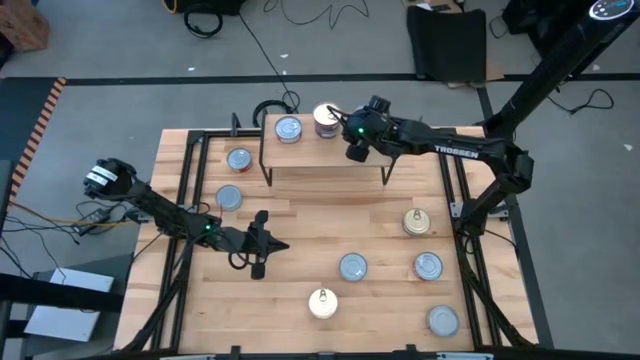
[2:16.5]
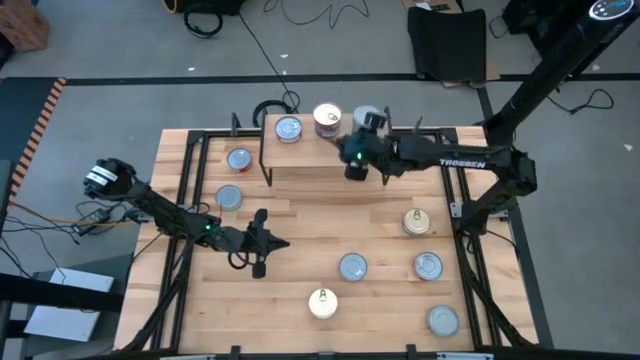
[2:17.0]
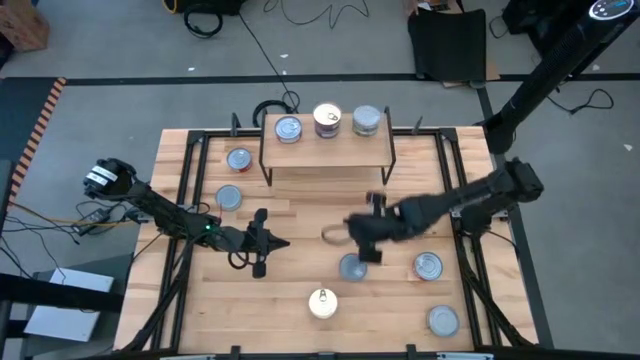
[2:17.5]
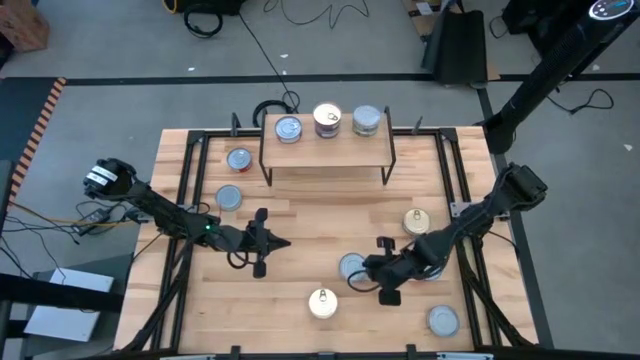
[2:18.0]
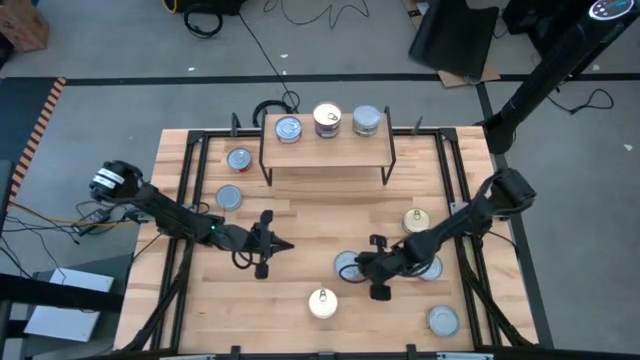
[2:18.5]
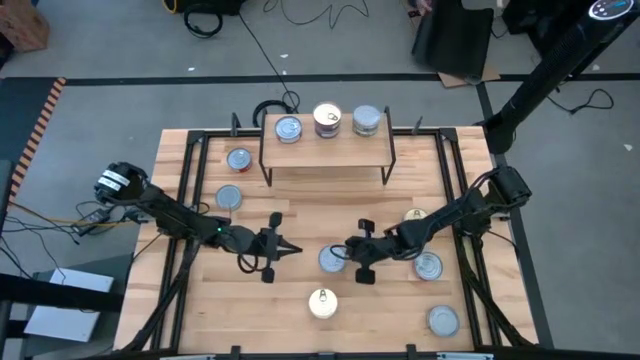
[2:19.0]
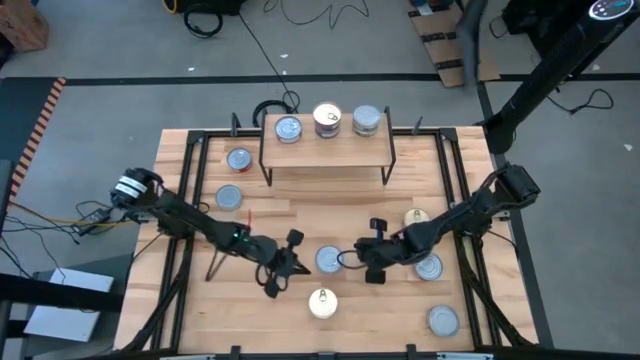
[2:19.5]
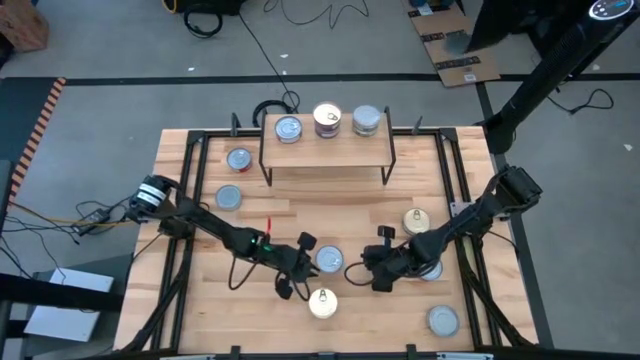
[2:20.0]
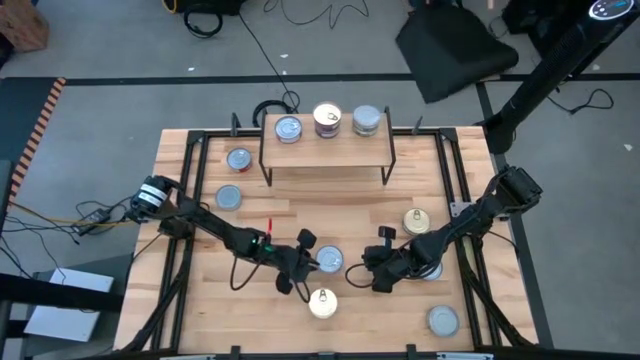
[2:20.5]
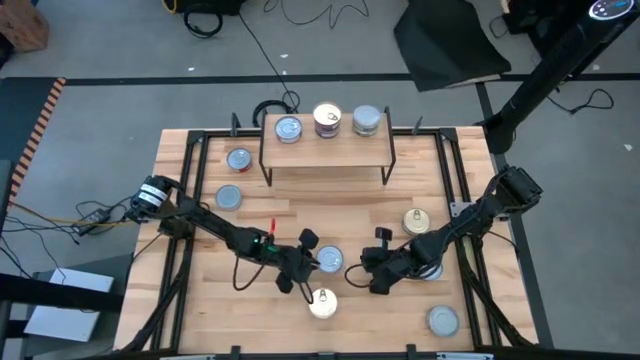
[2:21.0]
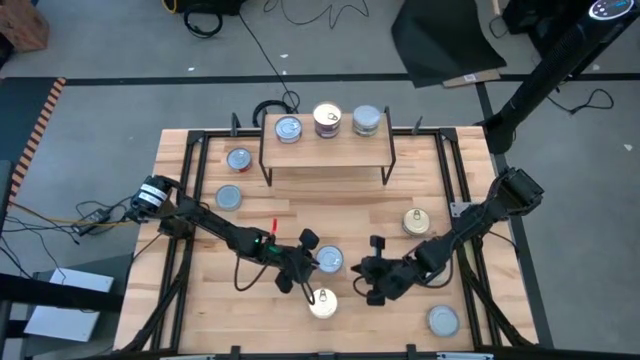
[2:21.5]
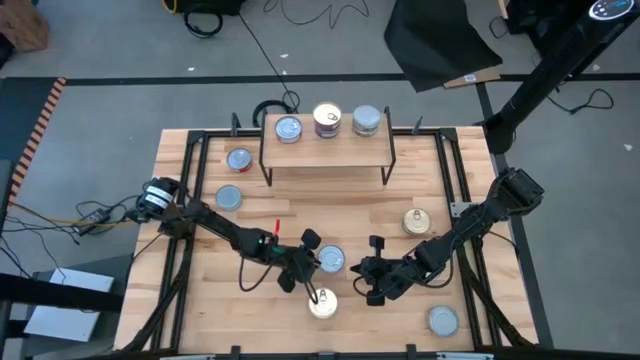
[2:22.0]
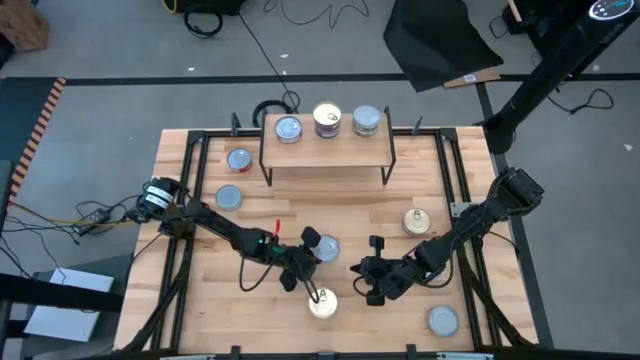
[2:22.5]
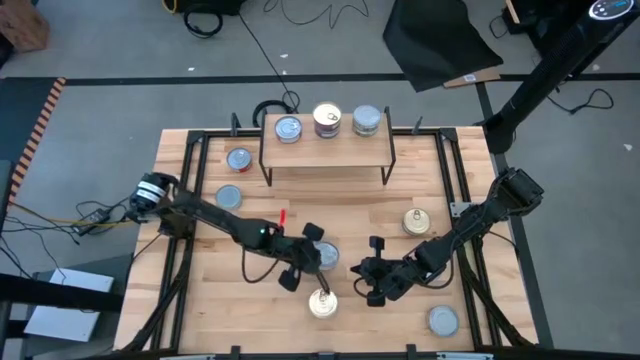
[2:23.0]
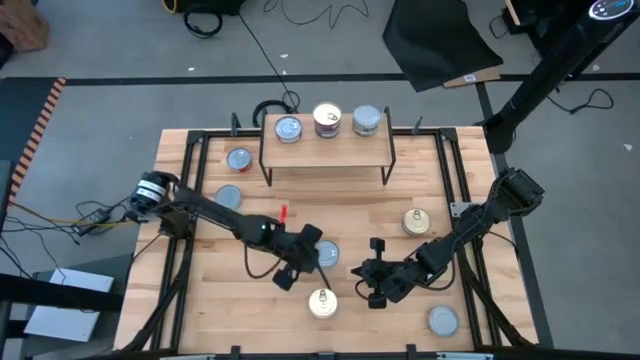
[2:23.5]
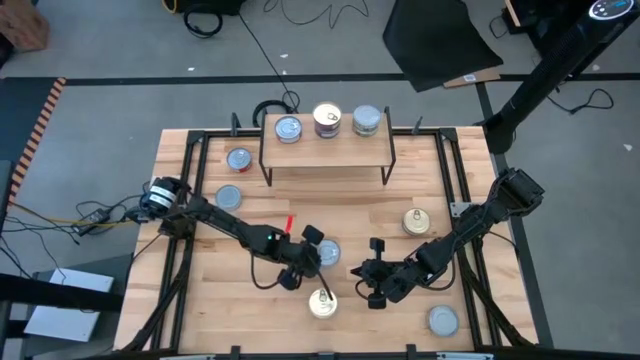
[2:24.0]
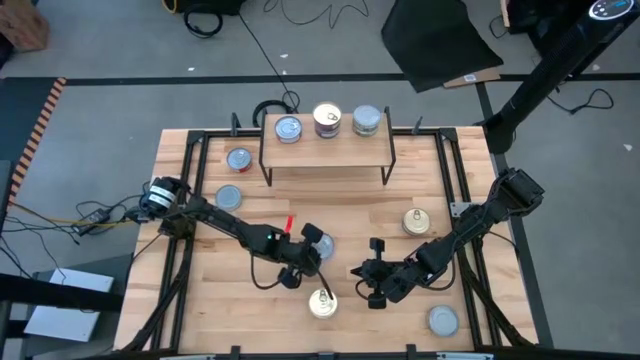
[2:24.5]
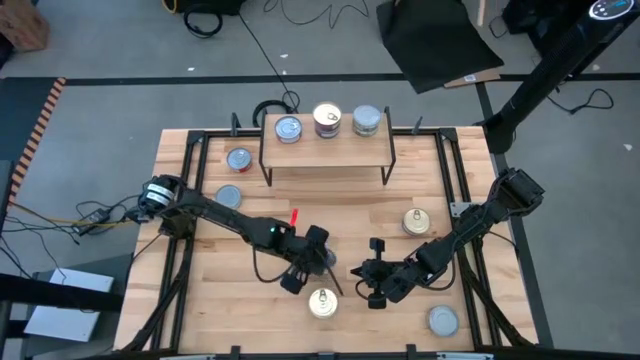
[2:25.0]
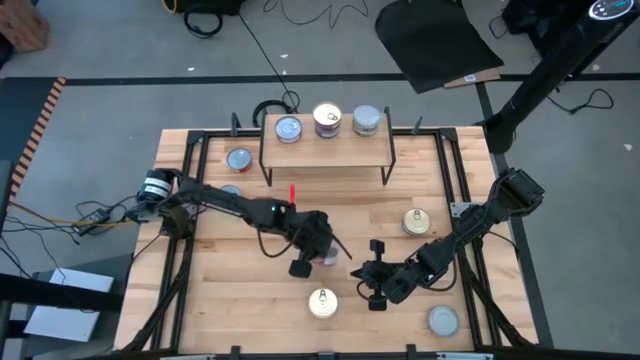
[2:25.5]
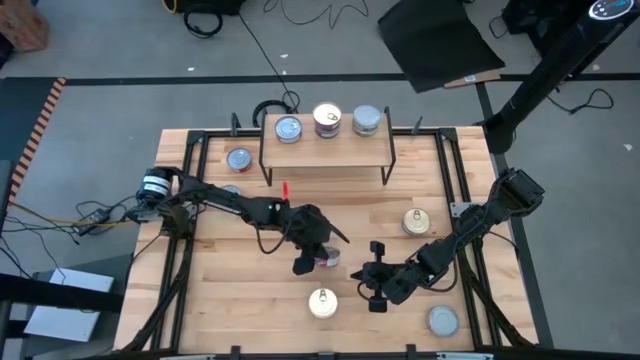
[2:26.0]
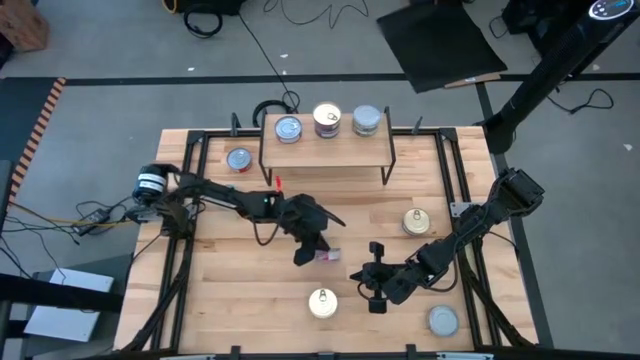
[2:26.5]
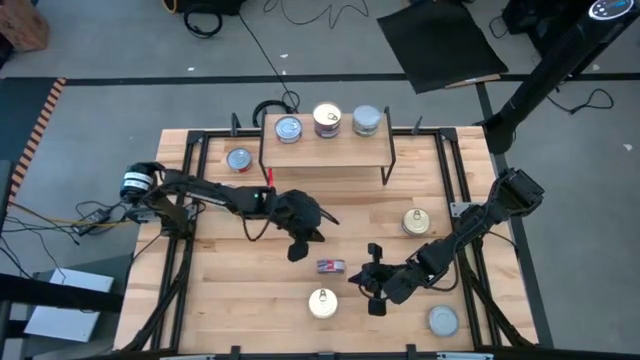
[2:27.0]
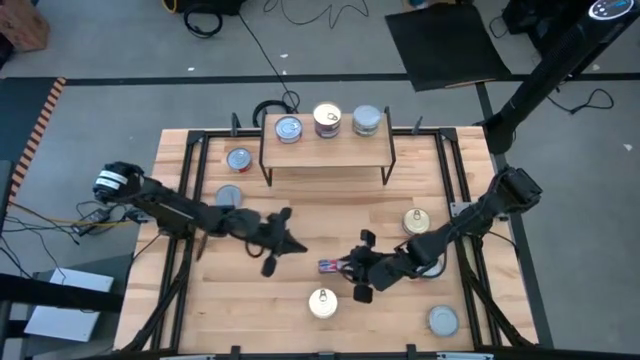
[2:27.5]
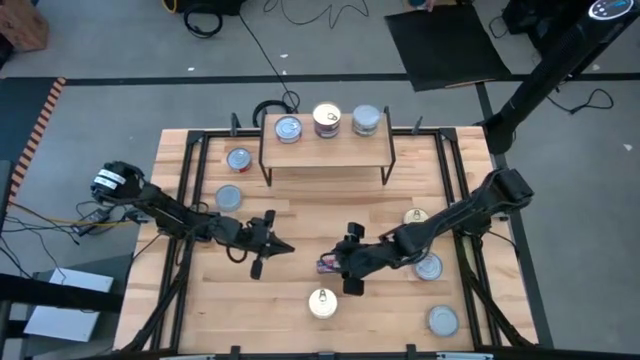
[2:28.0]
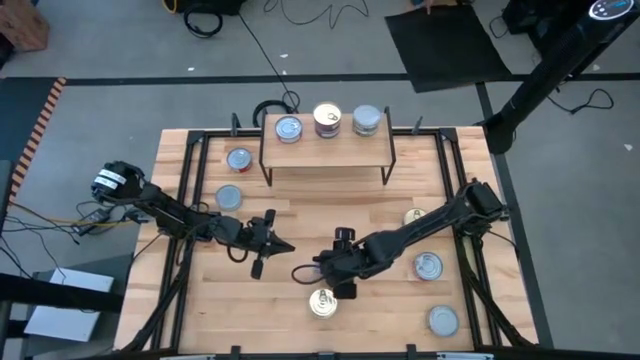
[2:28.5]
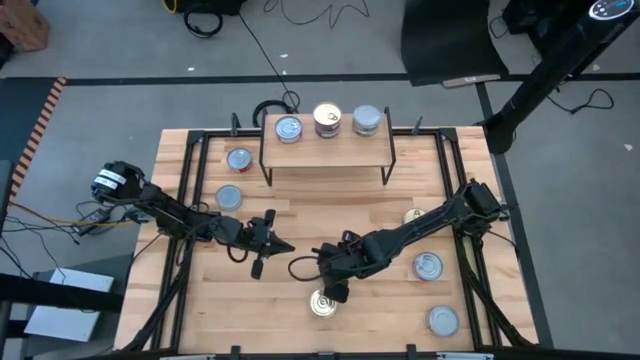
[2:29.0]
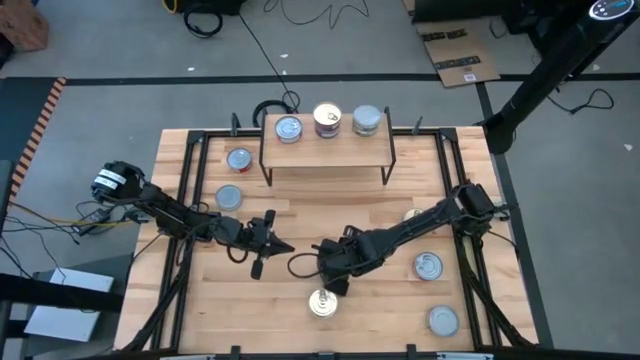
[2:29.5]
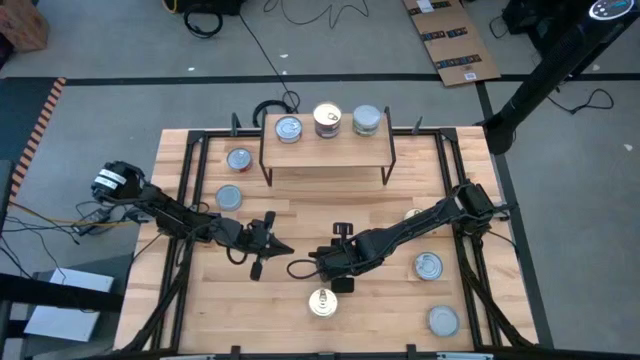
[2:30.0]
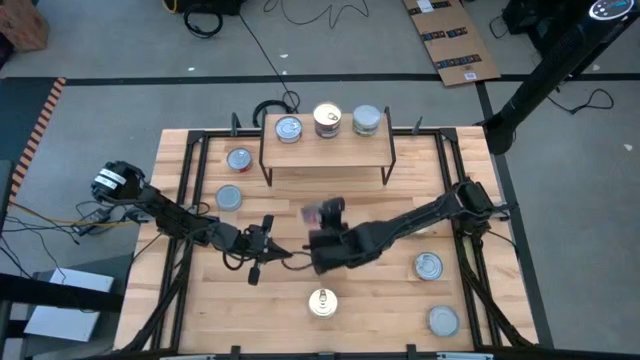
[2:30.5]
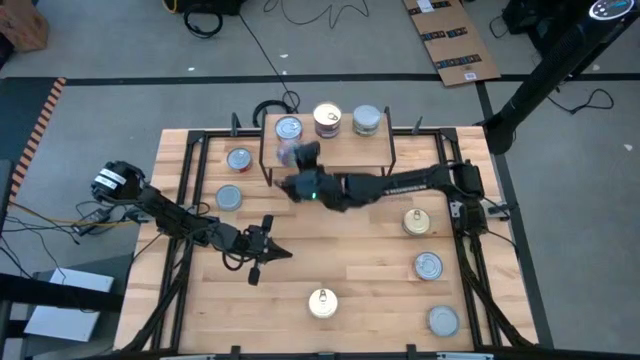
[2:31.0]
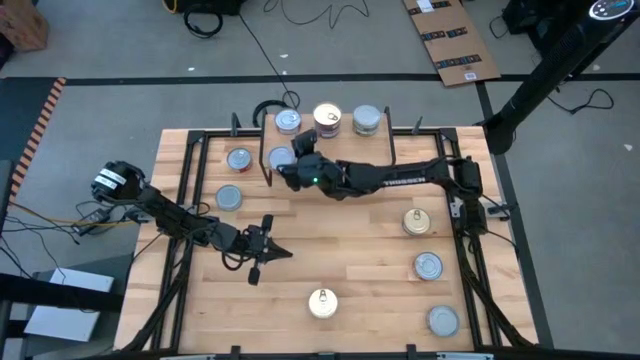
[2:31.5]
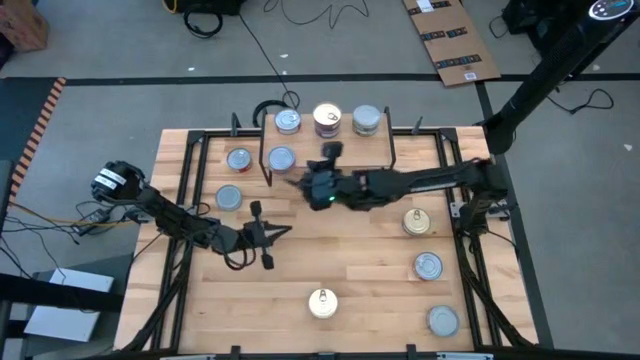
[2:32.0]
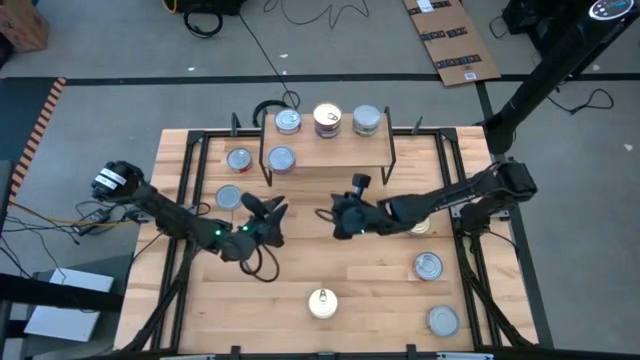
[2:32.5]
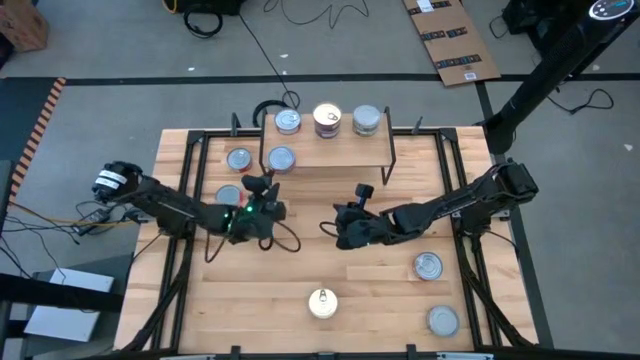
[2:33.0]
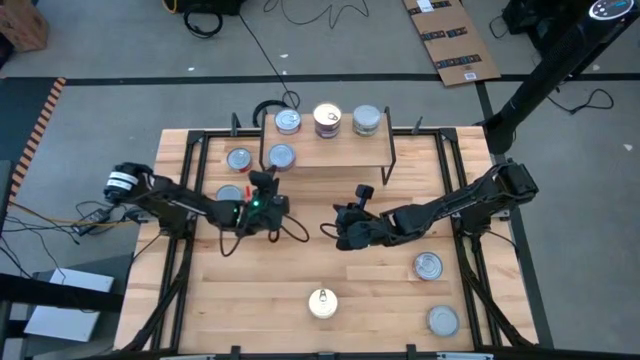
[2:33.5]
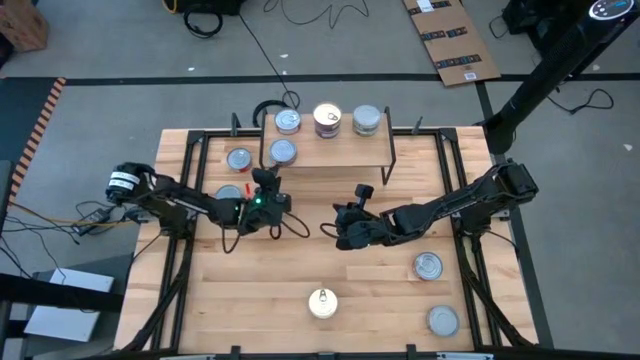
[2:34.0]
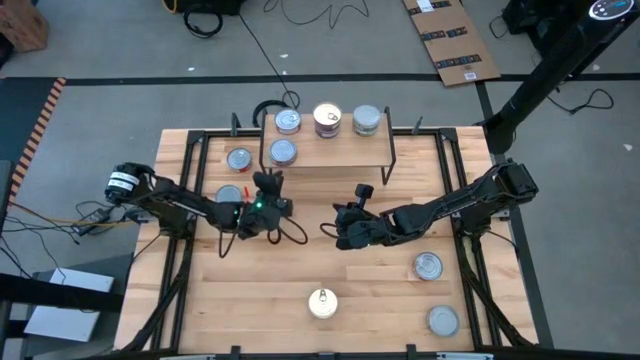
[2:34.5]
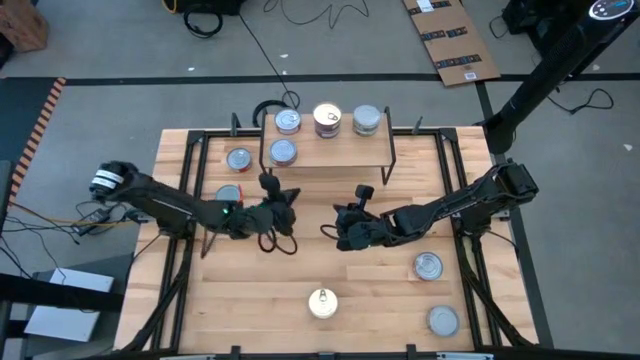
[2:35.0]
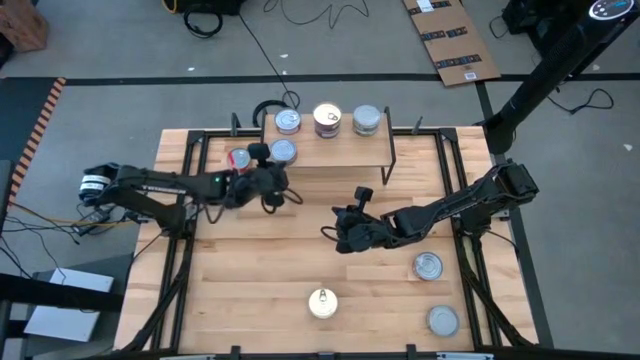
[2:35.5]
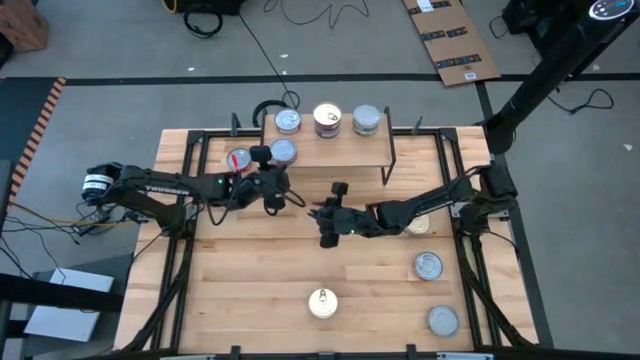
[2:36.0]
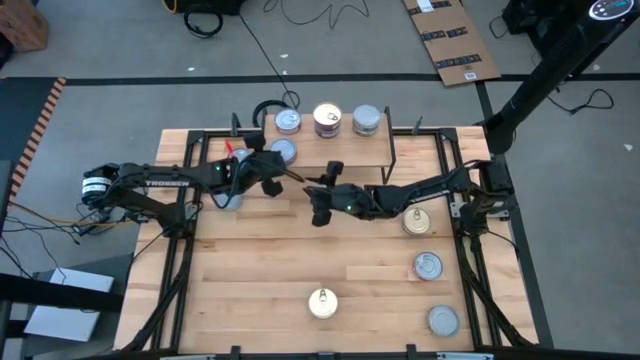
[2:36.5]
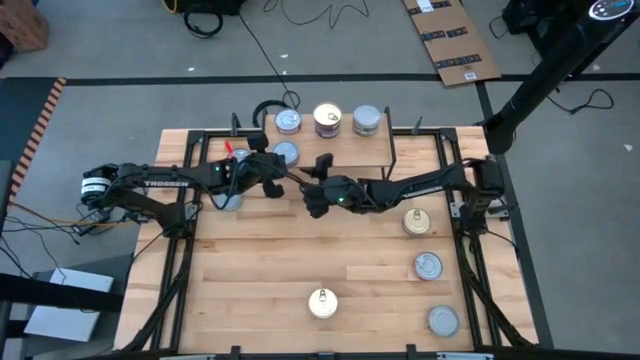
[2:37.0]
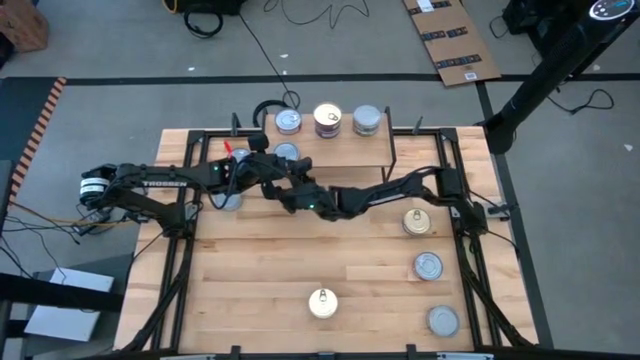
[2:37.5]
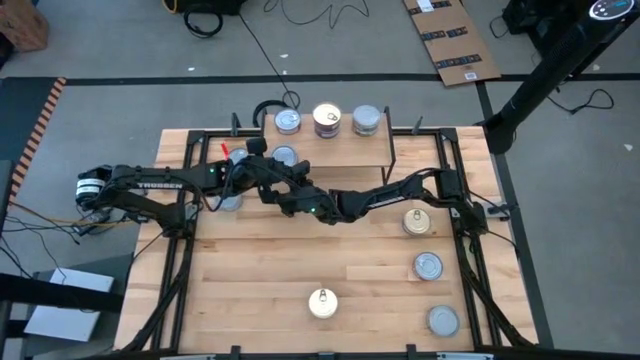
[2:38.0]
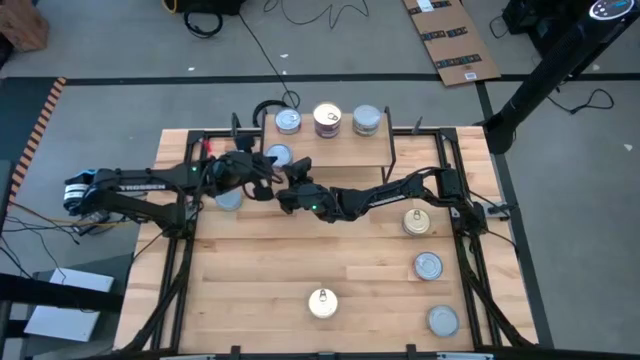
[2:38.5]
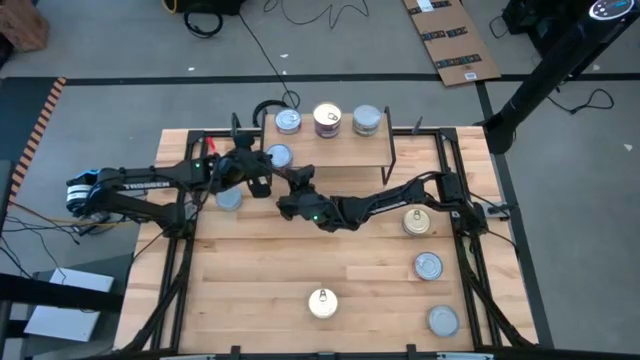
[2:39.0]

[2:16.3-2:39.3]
Task: Stack canned seafood by type on shelf
Stack the red tuna can on top of the red tuna can on the shelf
